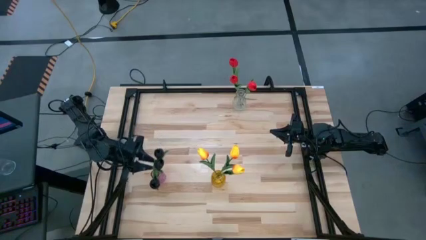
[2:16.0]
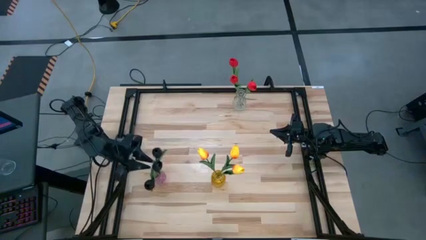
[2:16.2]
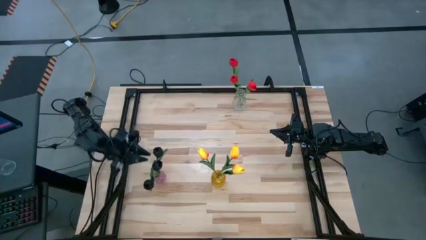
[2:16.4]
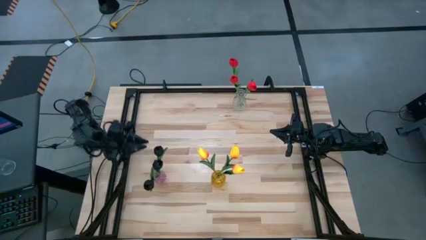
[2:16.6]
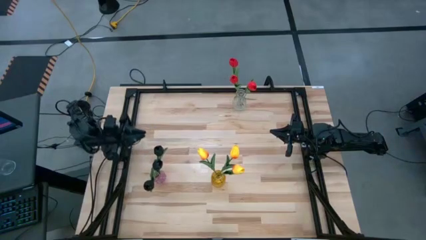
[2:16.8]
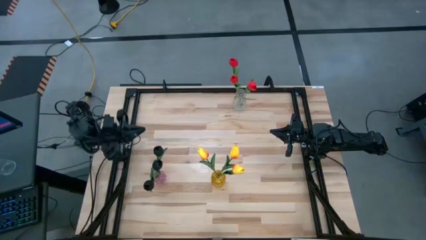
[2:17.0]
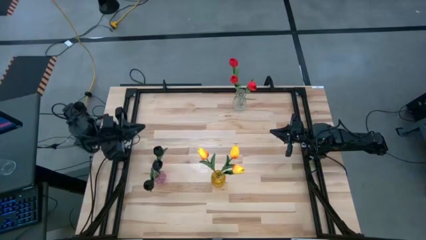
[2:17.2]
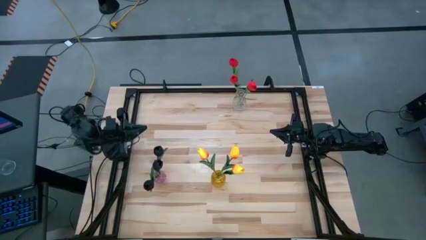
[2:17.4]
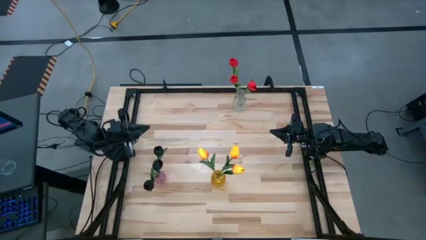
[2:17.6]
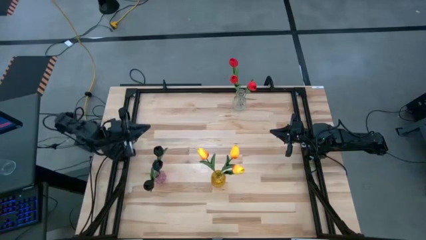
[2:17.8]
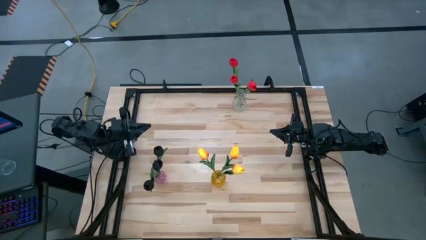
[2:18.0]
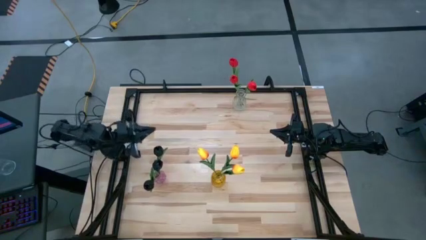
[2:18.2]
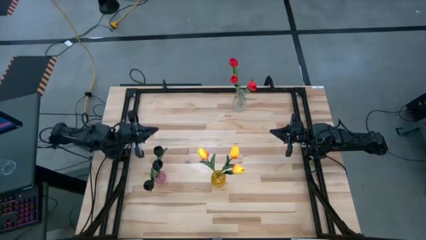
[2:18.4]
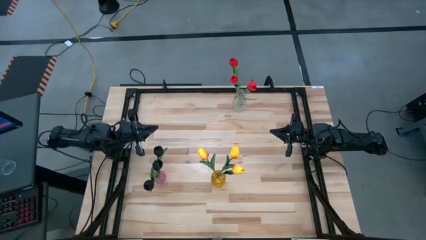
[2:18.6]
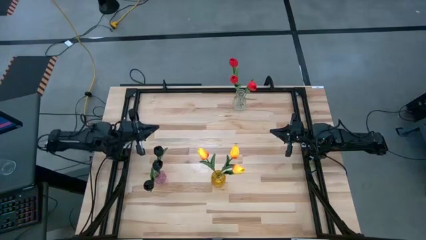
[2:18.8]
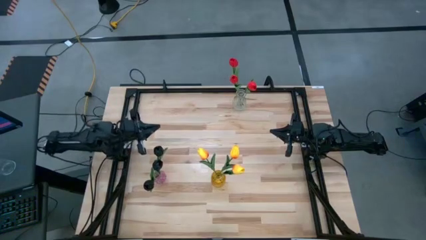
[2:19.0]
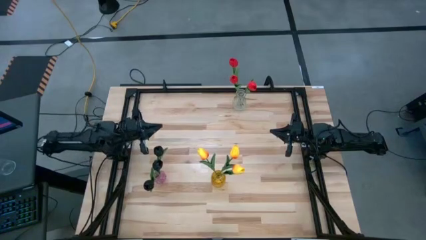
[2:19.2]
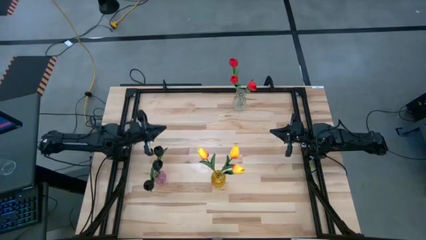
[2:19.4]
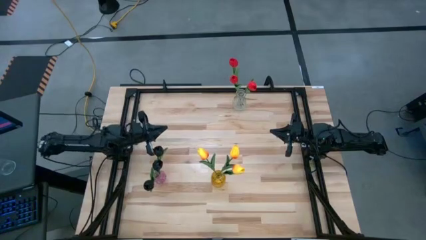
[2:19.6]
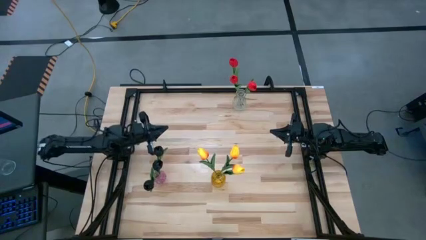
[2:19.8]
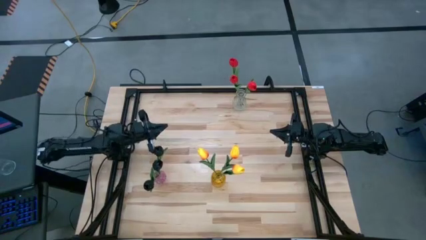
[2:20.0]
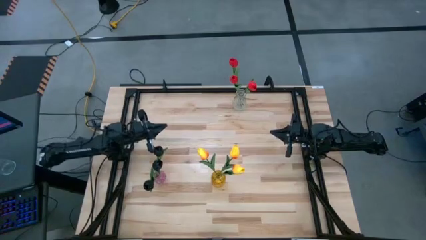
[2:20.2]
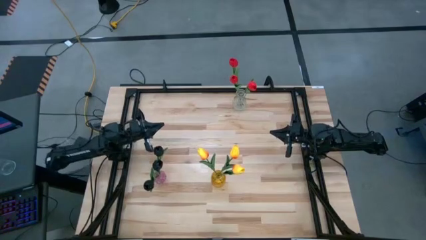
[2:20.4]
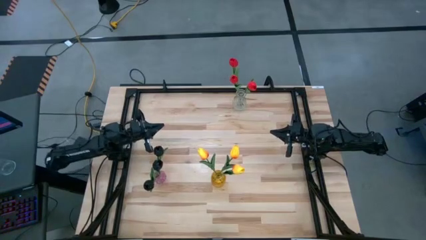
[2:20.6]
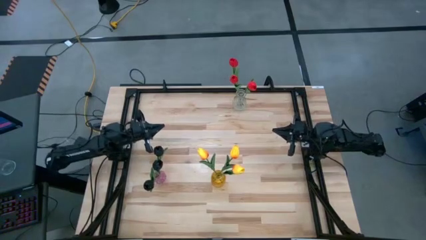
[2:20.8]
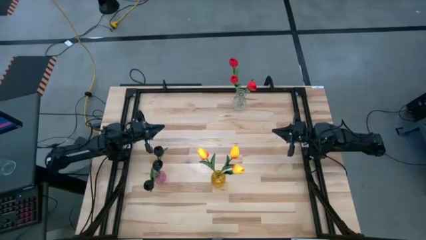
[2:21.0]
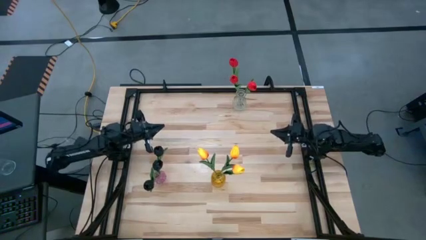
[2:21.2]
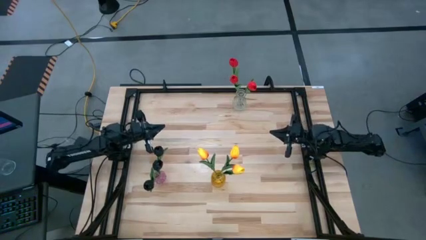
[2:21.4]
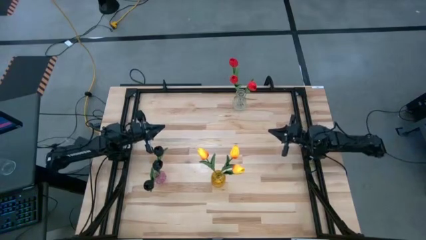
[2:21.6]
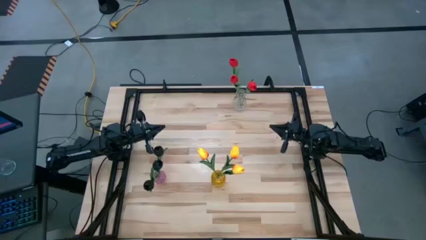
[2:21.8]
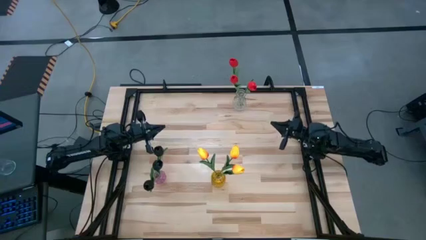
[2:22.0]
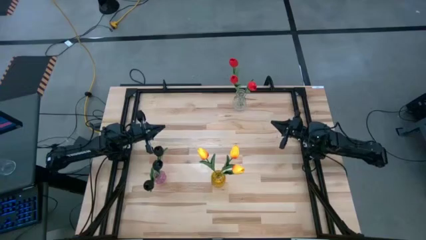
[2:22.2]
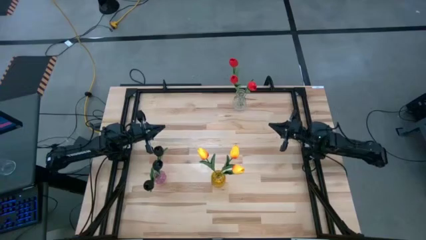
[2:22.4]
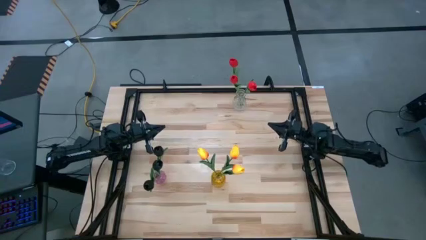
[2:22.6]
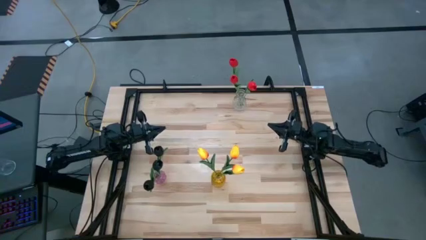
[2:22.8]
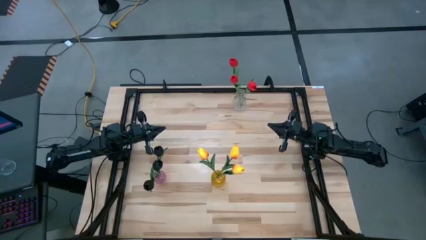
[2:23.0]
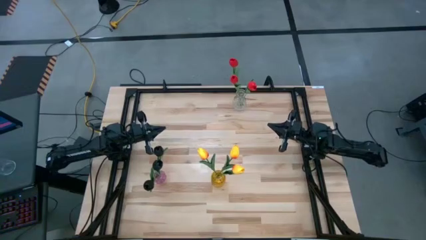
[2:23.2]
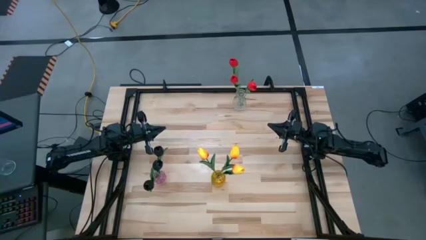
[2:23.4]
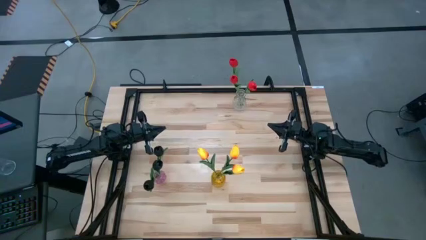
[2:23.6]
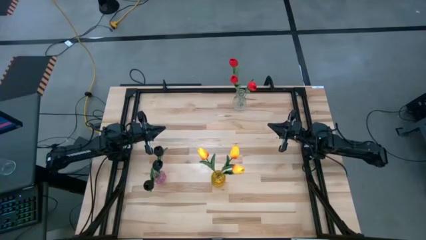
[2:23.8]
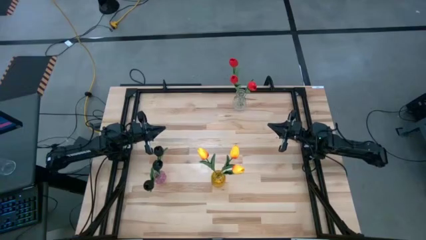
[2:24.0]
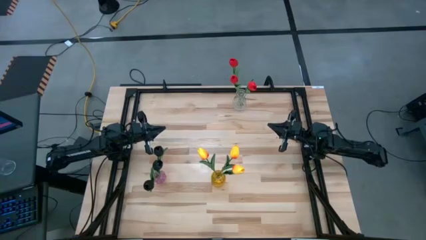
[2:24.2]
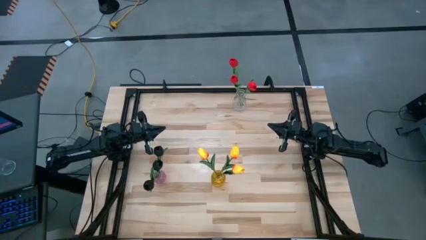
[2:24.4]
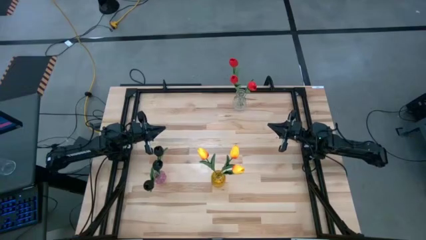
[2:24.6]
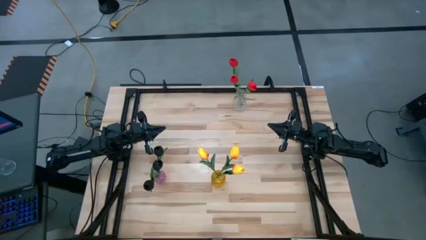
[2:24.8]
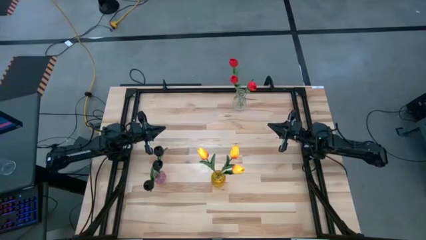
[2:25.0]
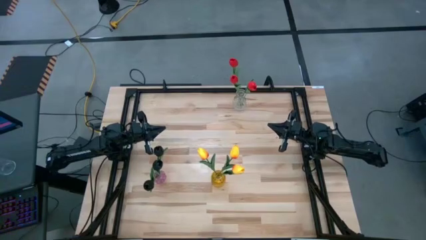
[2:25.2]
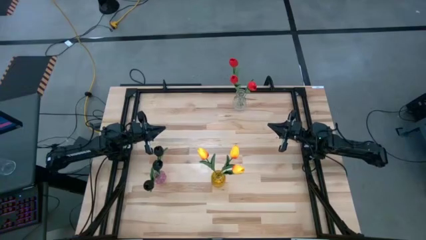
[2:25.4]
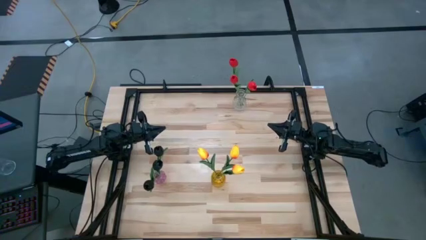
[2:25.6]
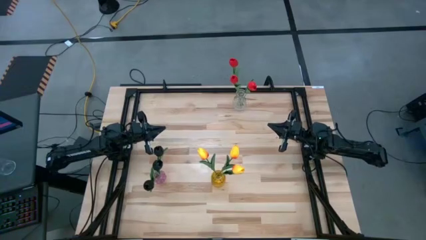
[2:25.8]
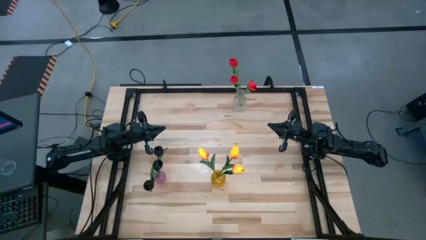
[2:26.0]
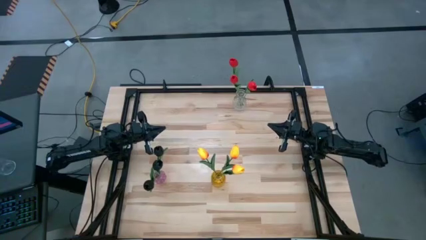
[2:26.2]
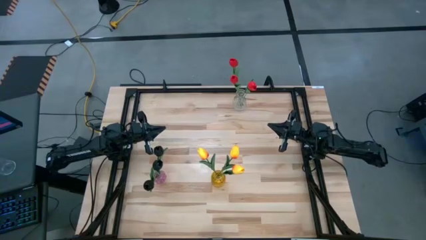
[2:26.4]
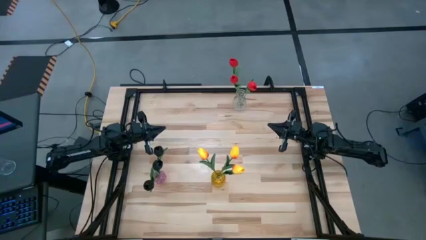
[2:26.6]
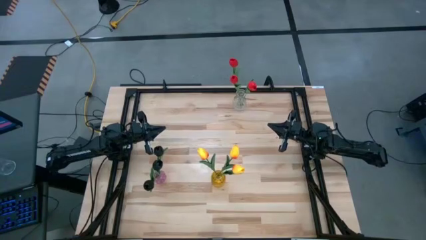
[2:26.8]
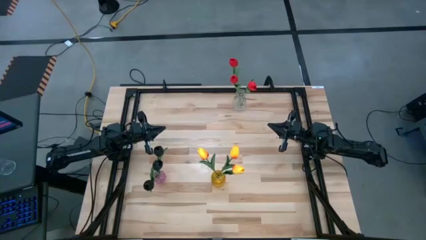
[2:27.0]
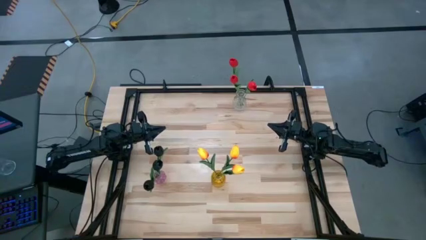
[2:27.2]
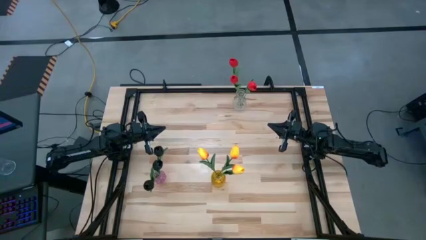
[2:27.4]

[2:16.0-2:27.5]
Task: Sort flowers into vase by color
Return to Home Position

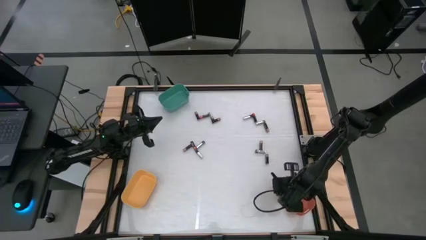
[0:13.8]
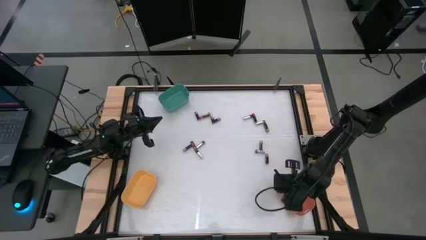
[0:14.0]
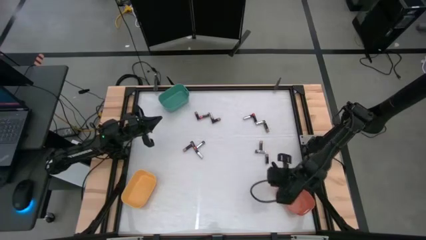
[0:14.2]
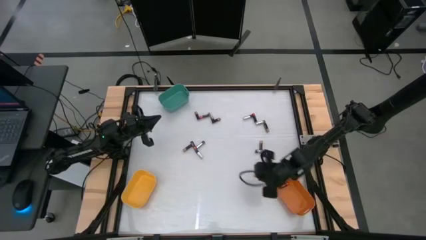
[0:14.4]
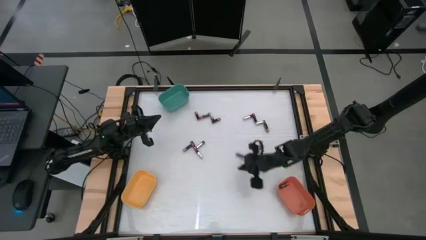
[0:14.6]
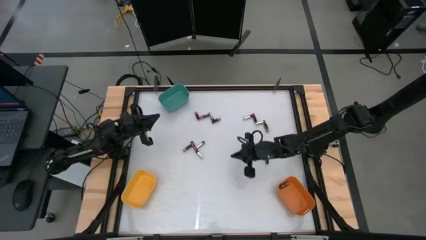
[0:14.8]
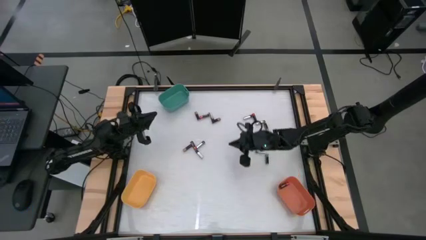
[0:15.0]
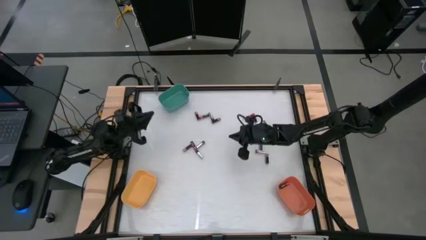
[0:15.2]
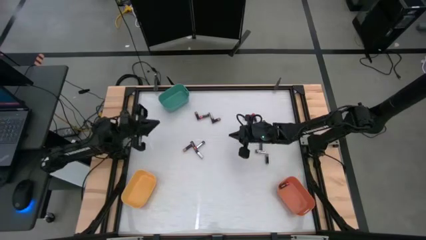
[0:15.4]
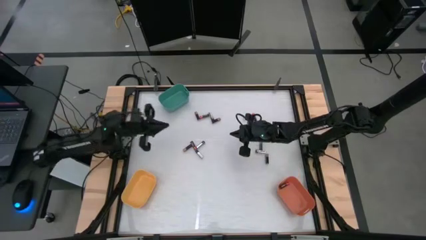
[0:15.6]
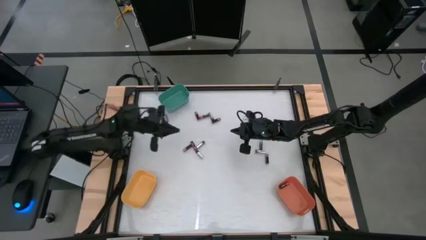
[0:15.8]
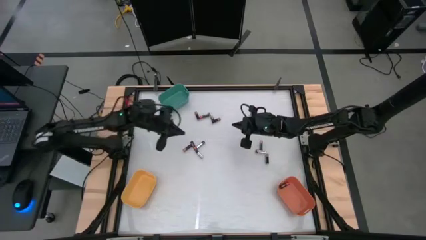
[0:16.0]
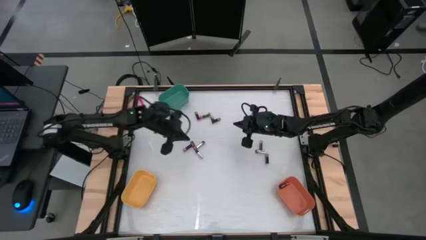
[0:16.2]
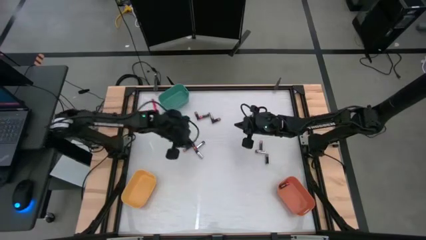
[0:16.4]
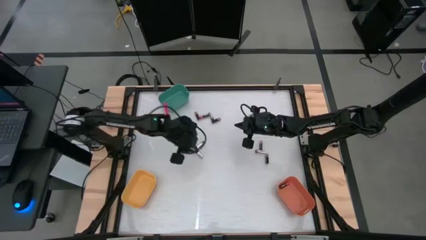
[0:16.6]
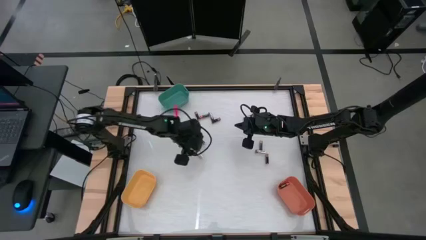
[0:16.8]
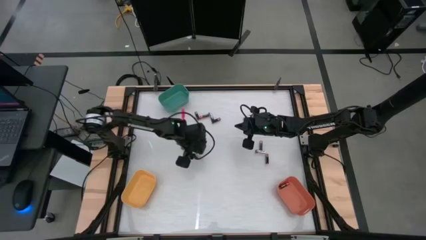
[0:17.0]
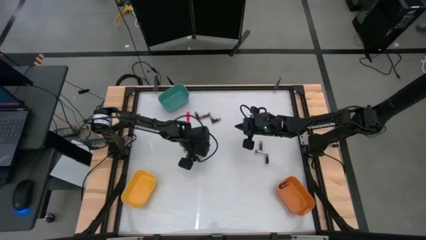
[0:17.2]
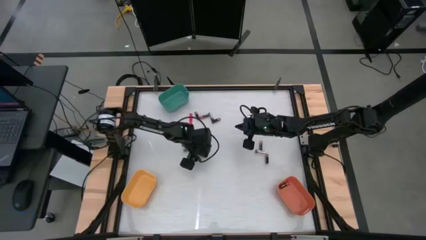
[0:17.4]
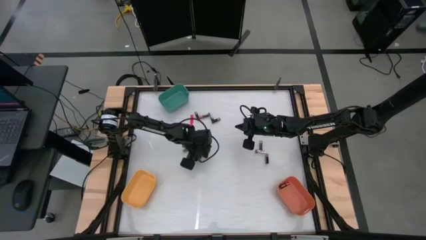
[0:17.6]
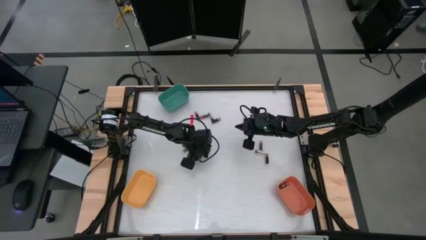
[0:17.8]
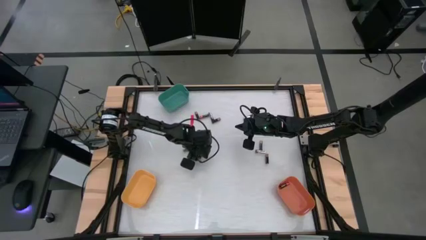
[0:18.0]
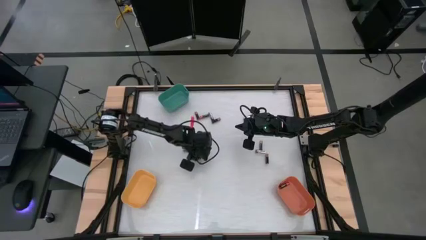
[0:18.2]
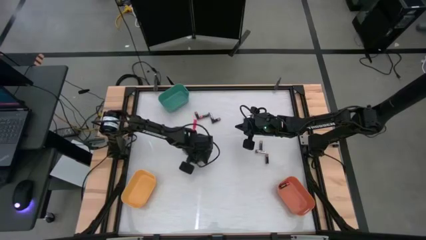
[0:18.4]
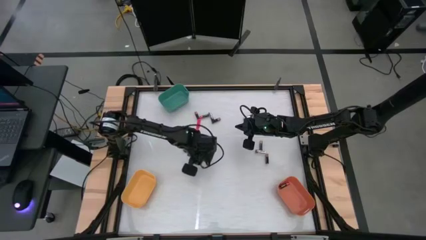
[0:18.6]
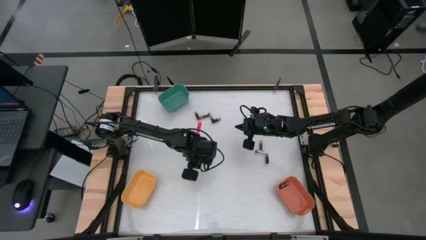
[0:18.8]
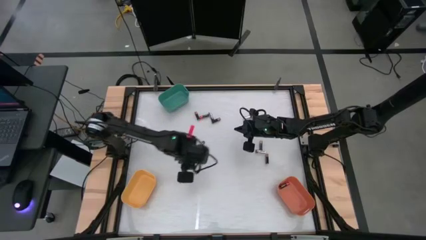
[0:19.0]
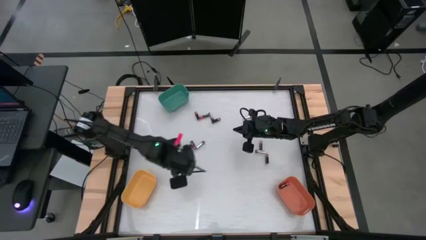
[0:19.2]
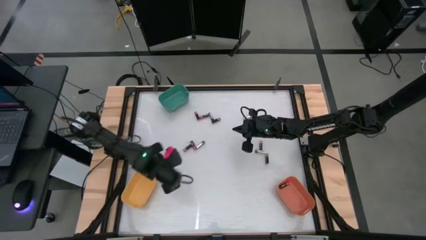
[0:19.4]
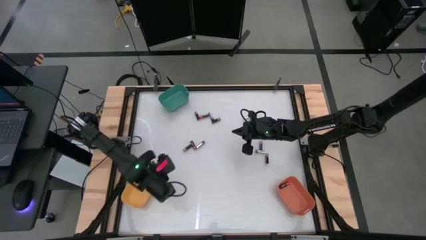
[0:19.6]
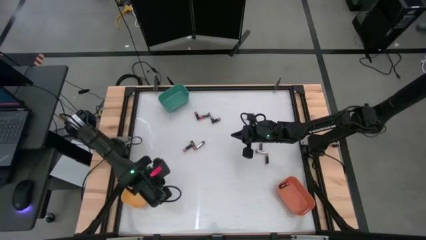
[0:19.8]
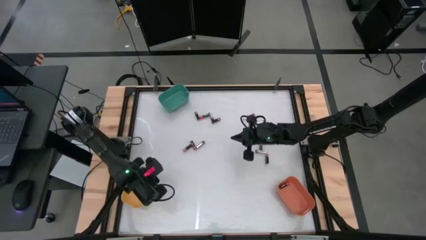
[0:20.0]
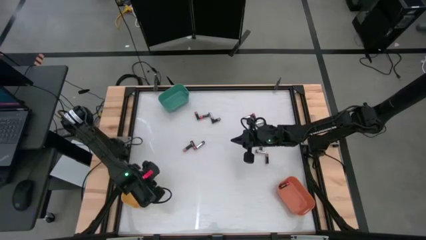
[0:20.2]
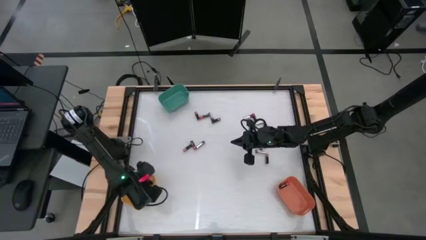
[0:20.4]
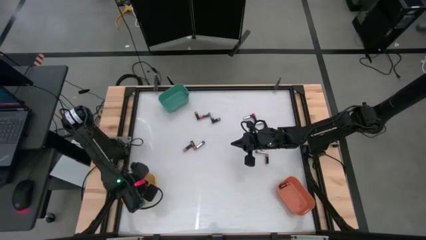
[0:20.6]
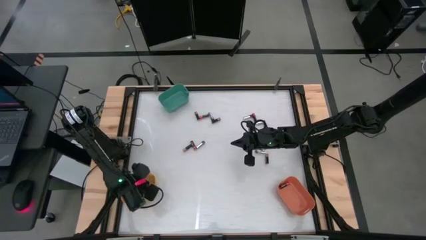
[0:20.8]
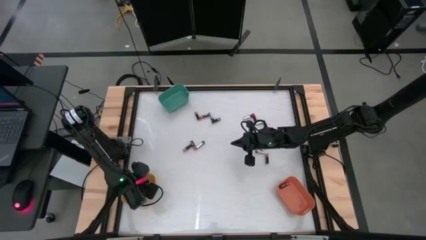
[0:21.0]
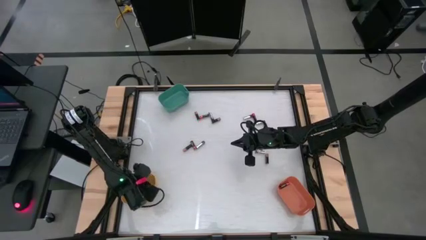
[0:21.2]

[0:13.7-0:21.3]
Task: Sort batteries
Put the silver battery into the yellow bin
